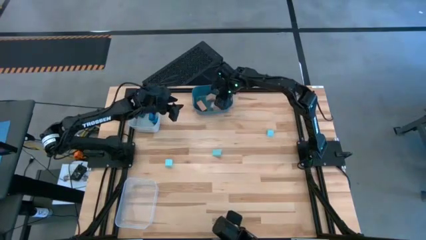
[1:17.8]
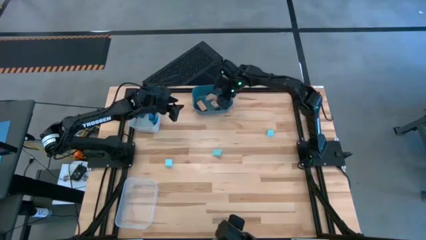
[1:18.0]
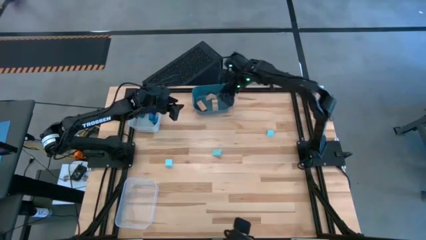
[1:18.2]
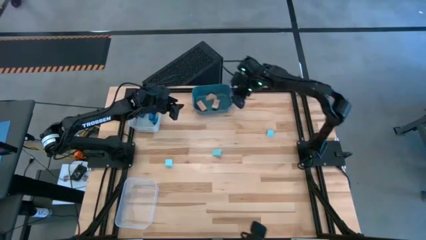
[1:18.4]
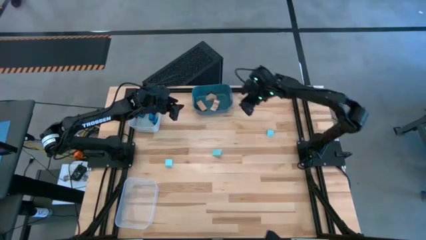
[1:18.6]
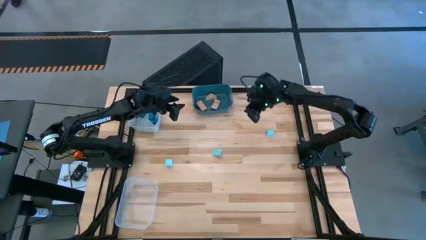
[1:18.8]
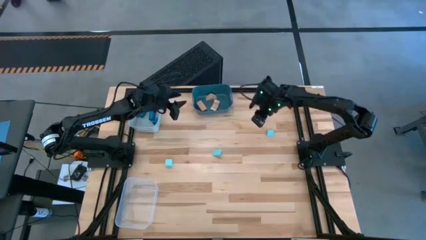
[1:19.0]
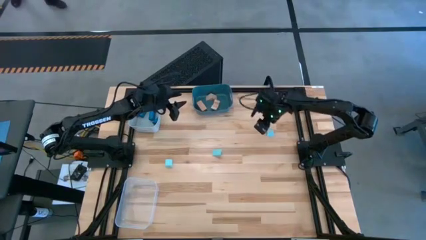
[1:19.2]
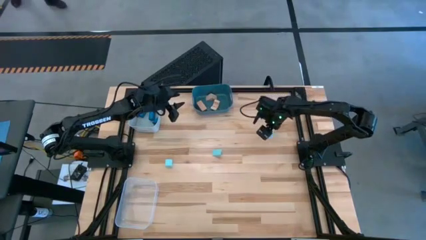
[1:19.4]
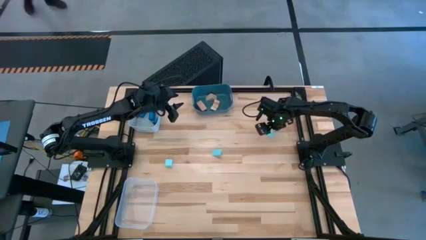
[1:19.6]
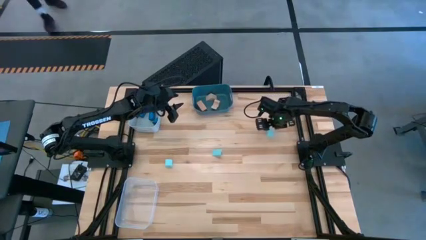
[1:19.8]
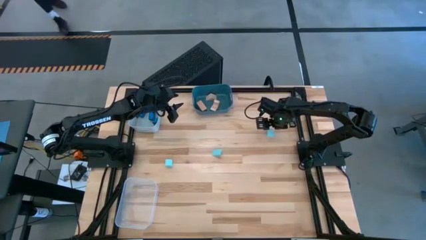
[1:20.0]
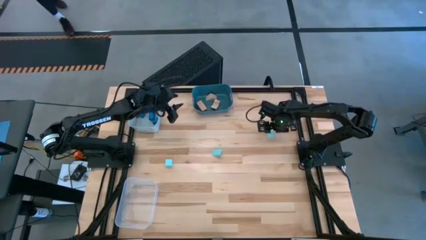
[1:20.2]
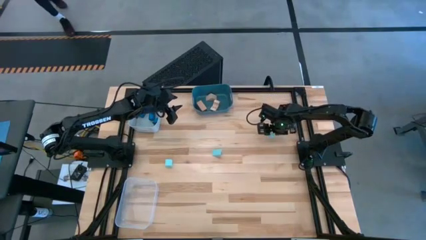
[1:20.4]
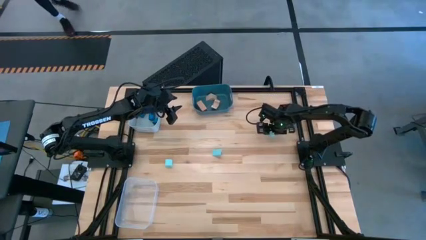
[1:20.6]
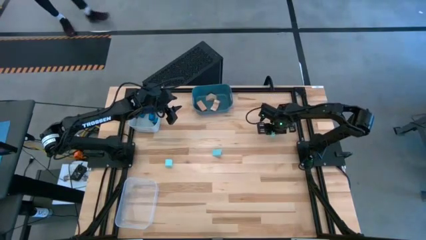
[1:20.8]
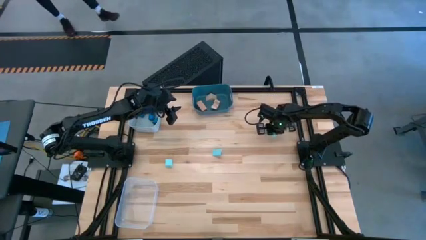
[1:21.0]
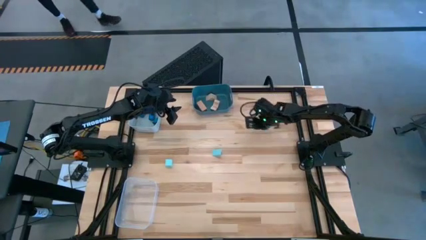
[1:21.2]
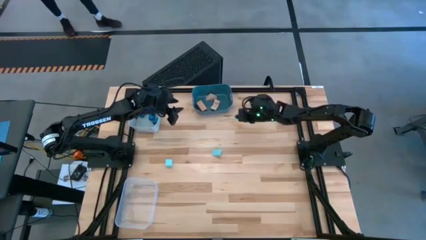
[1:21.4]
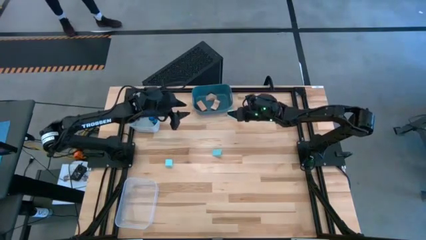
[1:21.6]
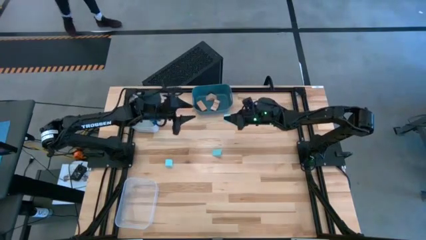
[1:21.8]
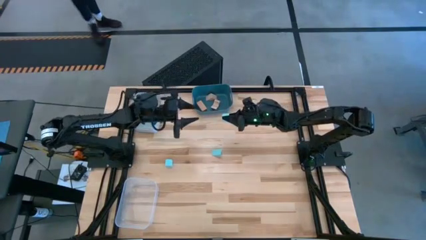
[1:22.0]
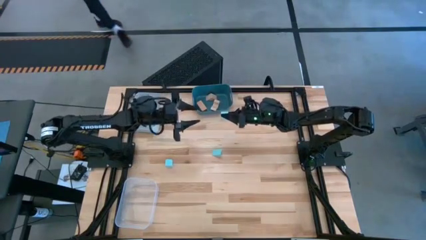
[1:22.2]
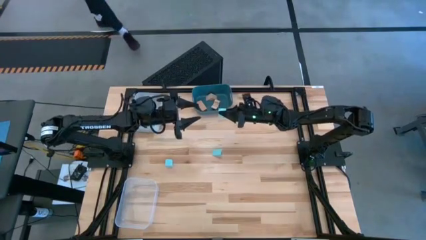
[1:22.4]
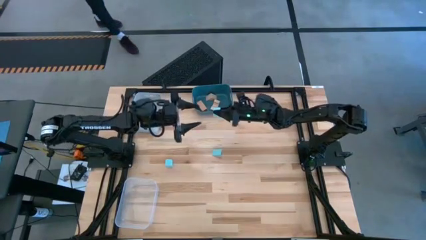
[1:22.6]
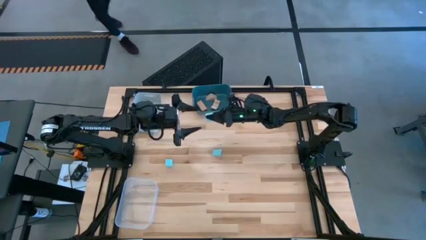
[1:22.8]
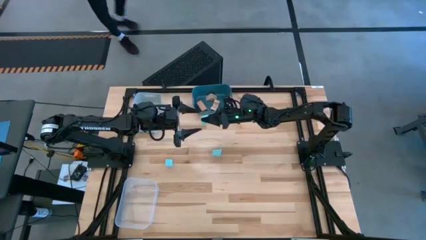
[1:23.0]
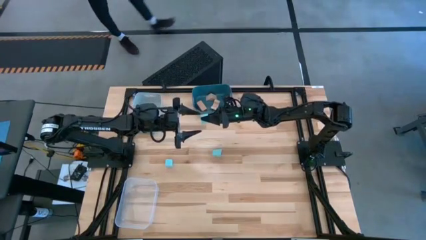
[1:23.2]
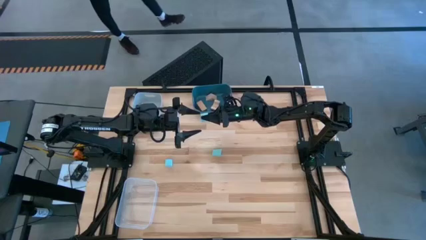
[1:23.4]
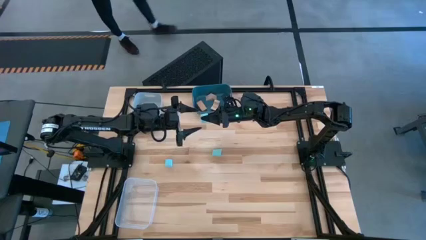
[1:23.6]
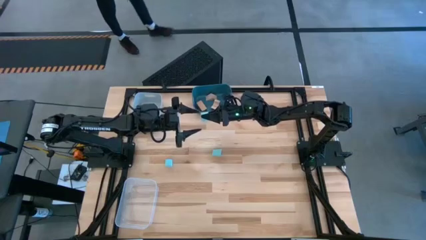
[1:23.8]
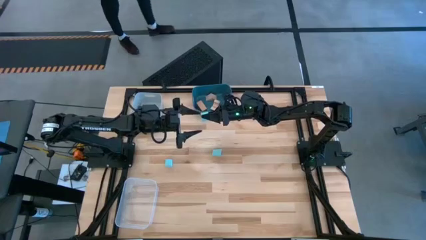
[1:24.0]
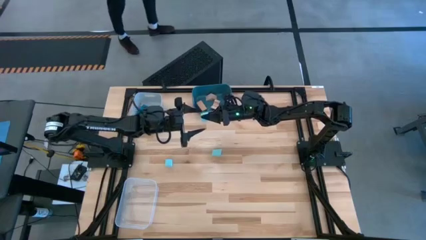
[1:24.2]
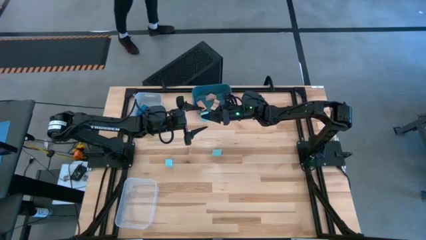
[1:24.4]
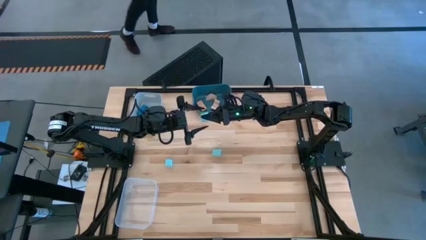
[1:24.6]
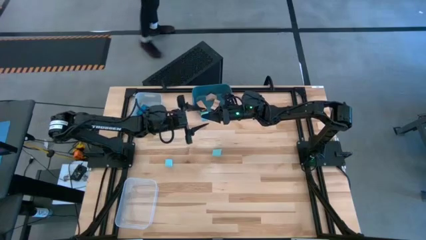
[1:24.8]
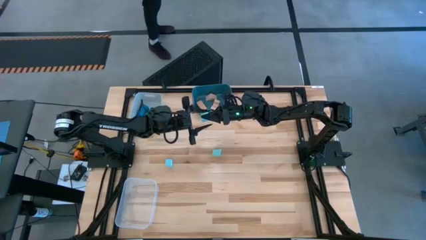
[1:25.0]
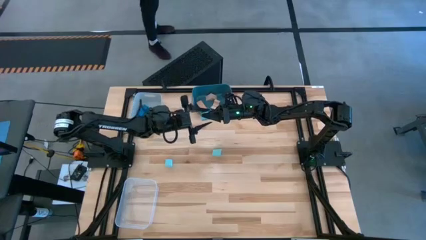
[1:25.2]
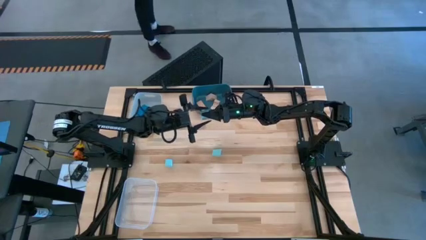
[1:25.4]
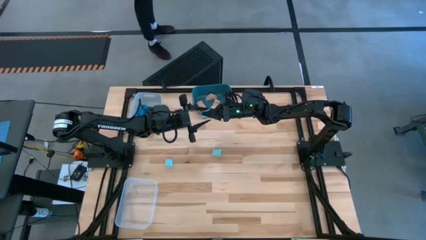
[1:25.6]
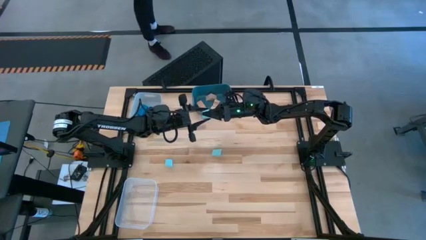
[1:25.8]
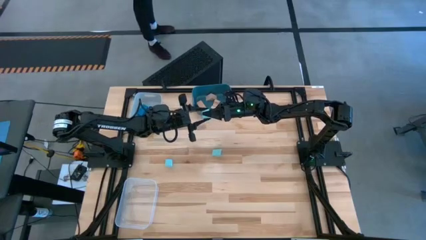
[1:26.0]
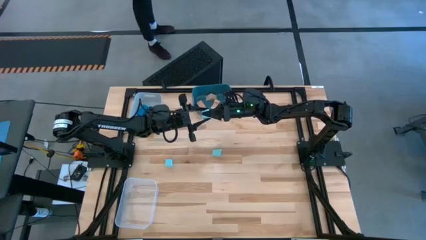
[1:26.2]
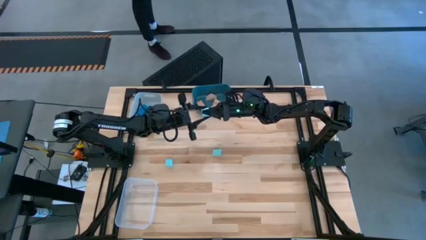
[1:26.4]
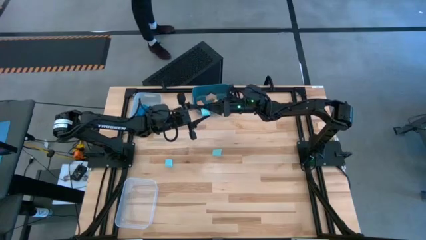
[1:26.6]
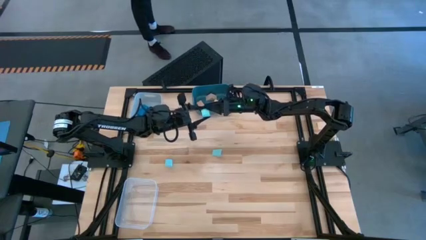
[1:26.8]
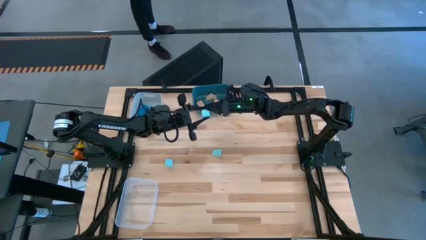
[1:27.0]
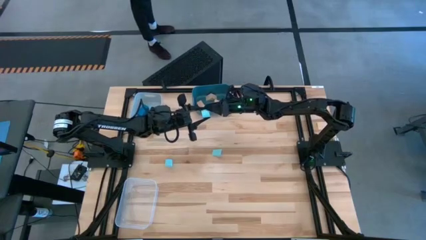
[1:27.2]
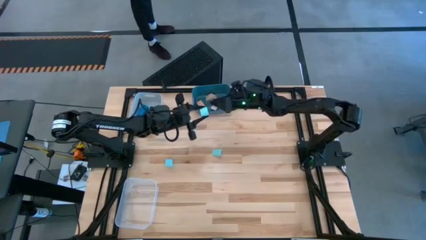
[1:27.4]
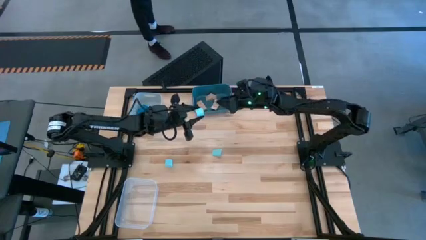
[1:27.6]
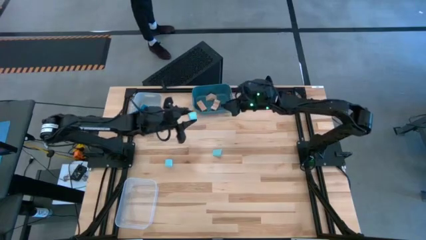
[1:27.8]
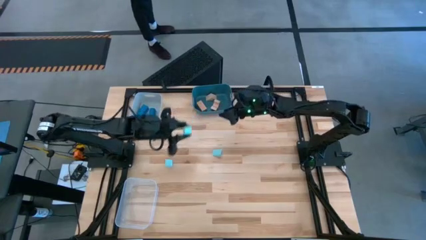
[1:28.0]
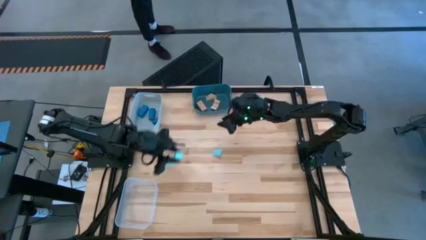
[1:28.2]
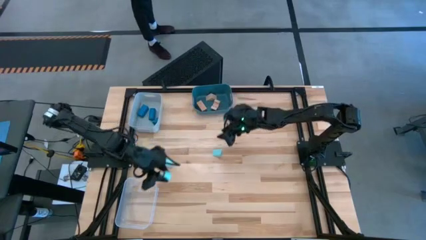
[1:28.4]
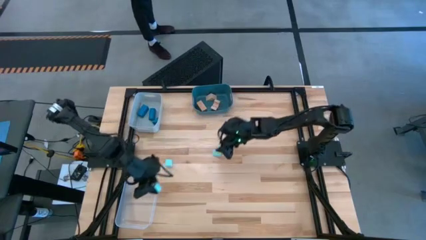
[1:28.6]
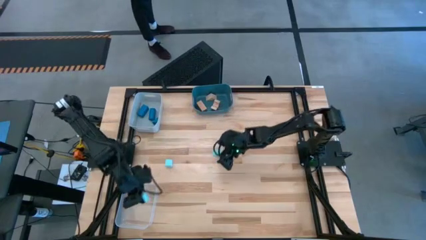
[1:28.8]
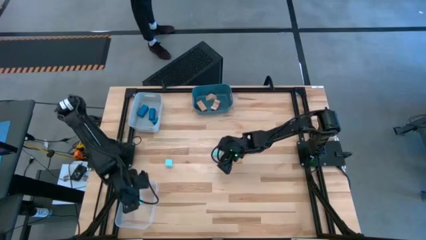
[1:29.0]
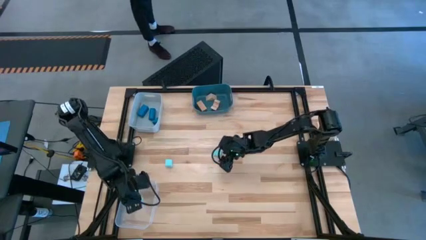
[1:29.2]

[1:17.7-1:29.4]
Task: Sort & place blocks by color
Put the right light blue block into the transparent bin

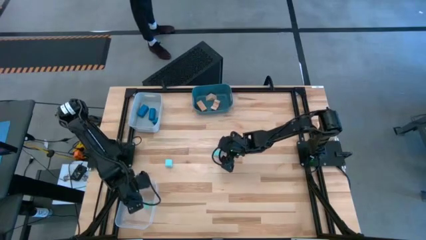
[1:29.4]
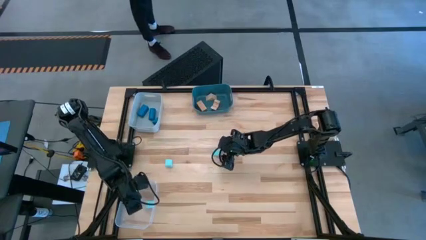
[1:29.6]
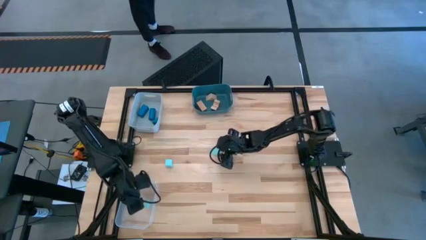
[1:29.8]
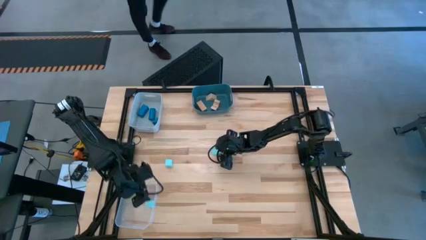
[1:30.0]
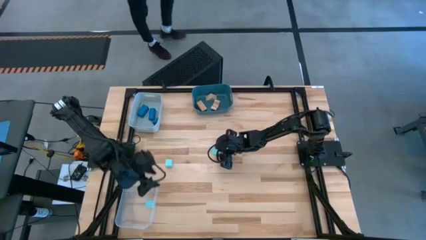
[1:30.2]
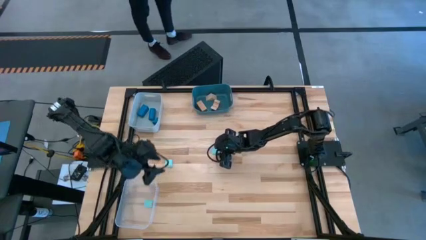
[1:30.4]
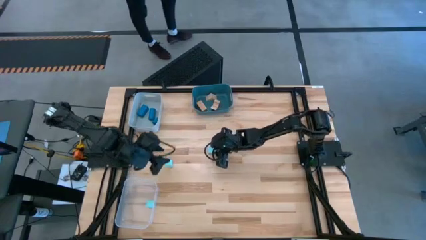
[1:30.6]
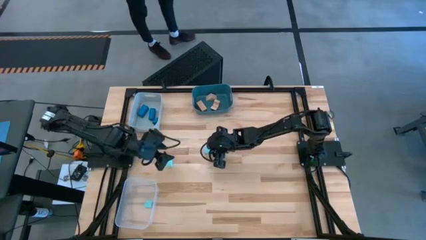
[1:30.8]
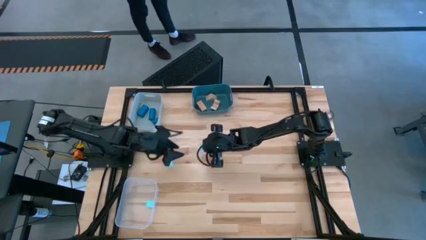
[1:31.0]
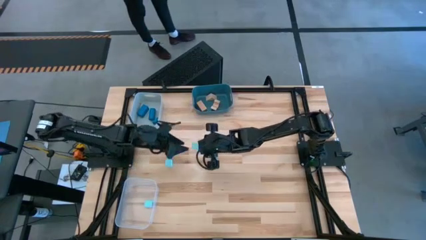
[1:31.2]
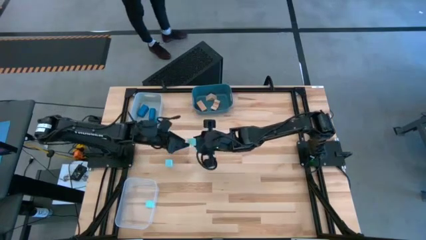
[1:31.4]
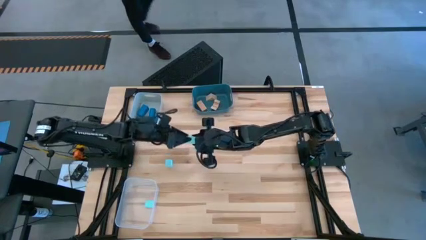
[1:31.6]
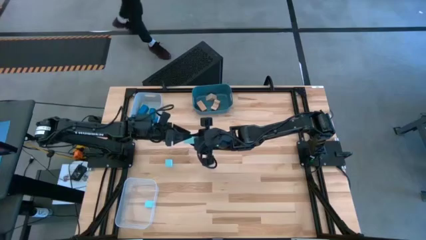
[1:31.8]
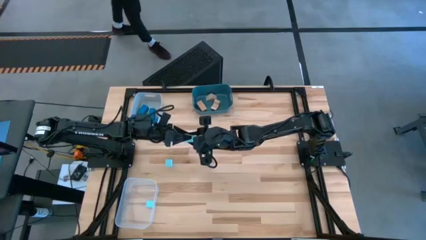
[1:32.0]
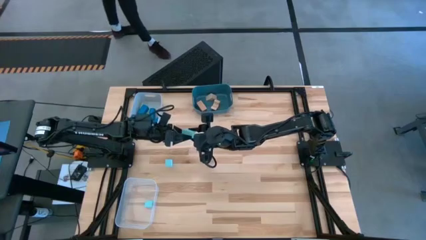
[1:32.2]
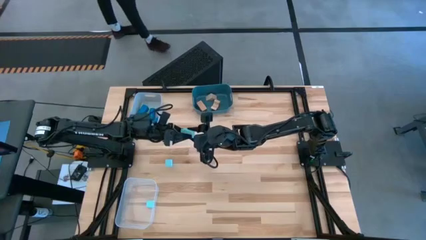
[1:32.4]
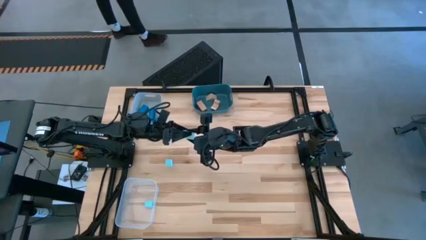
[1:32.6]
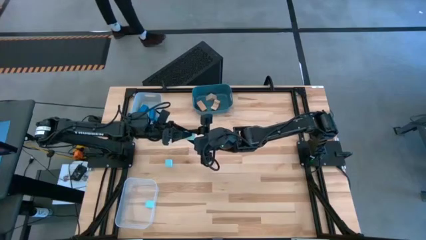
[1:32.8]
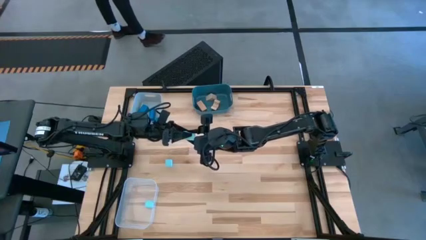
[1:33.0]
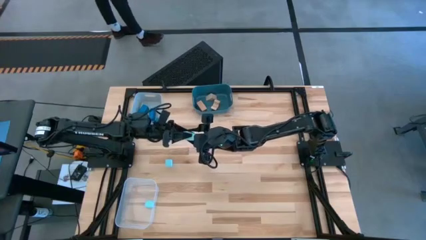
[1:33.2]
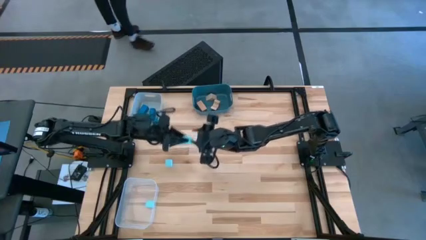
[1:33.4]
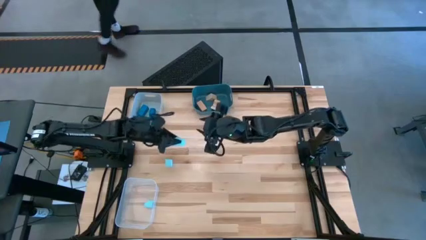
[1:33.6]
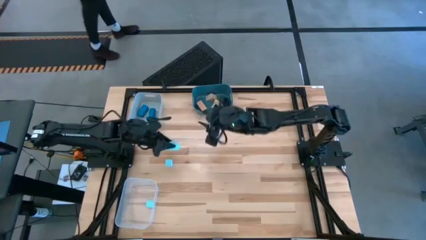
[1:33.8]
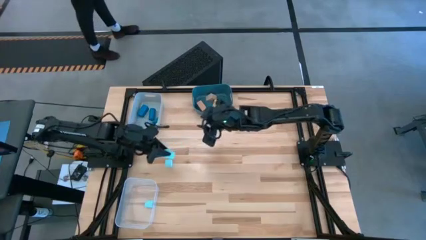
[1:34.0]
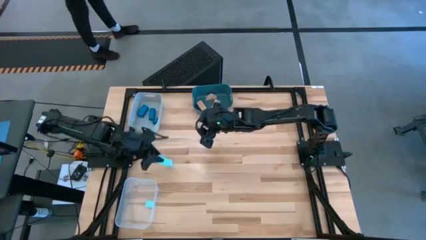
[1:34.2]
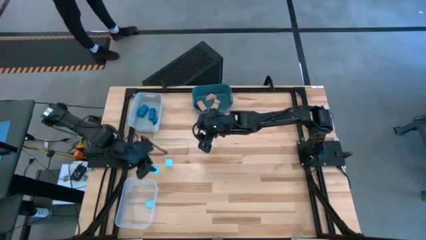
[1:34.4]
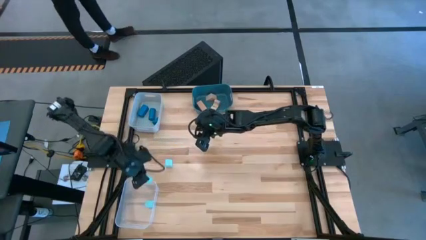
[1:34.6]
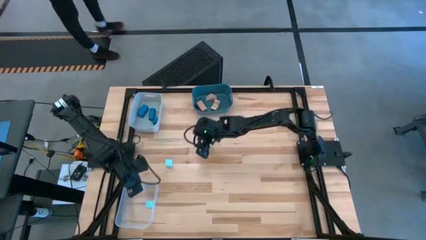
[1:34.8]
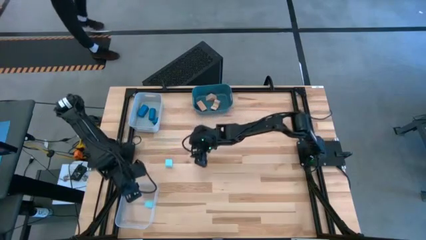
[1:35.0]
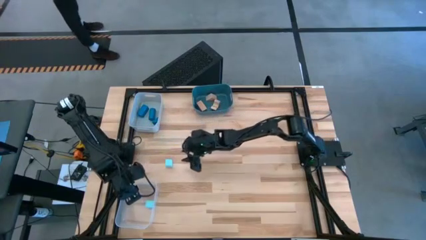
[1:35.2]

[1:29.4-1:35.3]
Put the right light blue block into the transparent bin
